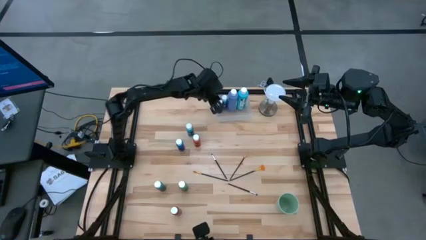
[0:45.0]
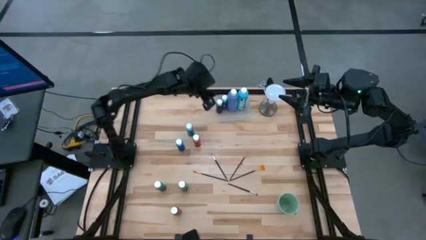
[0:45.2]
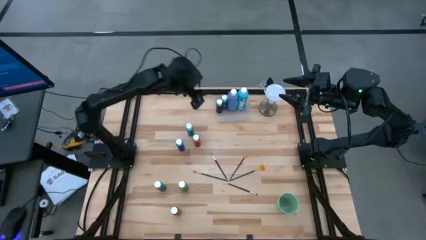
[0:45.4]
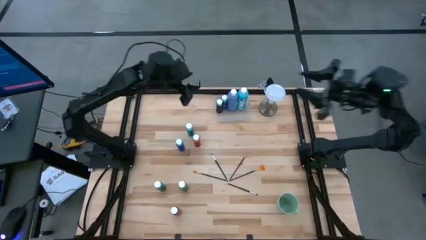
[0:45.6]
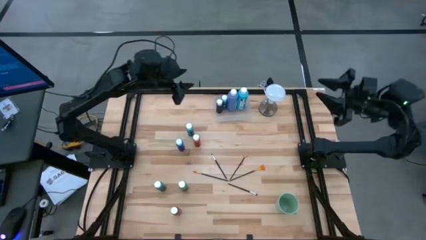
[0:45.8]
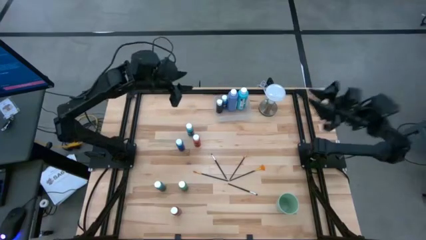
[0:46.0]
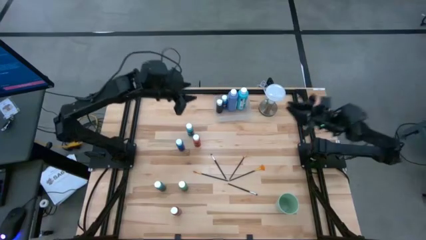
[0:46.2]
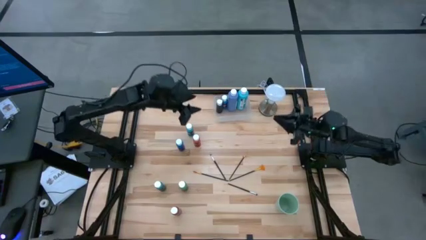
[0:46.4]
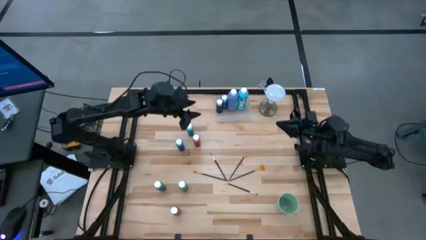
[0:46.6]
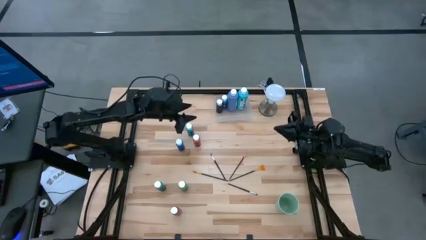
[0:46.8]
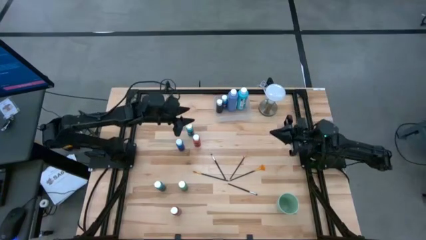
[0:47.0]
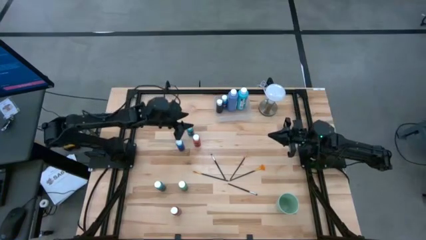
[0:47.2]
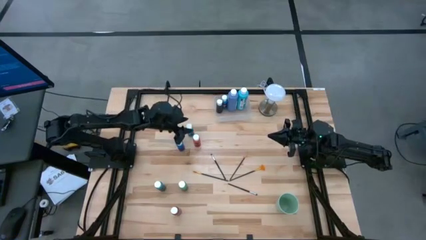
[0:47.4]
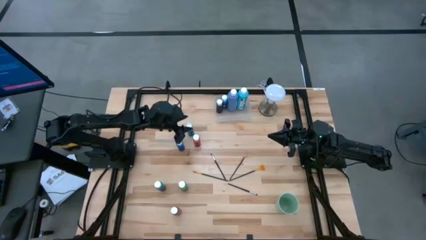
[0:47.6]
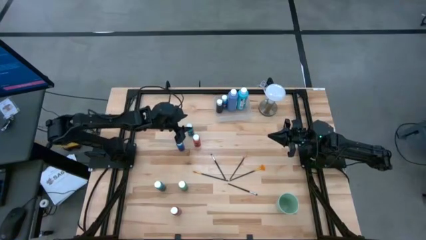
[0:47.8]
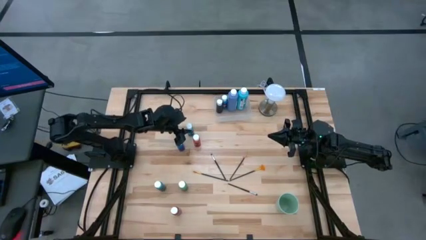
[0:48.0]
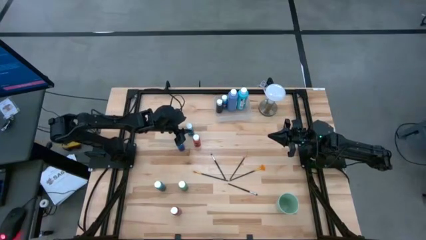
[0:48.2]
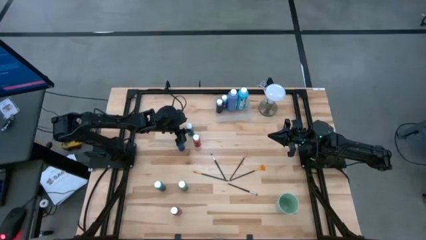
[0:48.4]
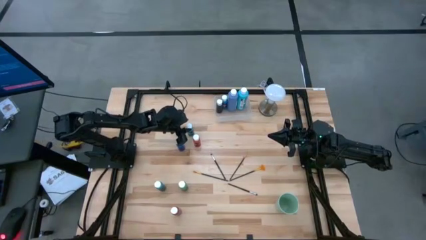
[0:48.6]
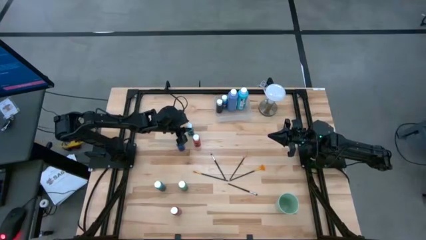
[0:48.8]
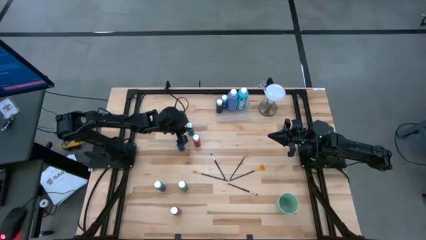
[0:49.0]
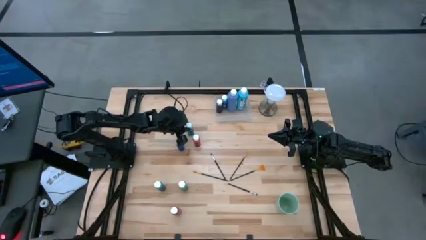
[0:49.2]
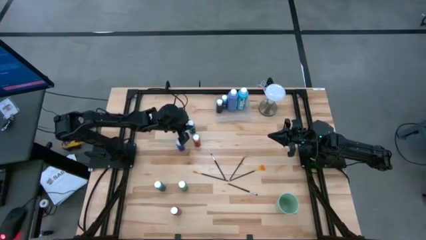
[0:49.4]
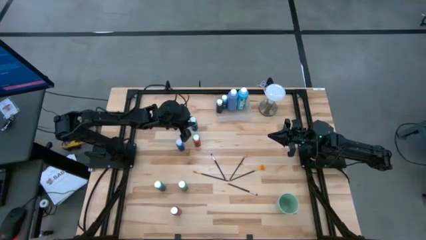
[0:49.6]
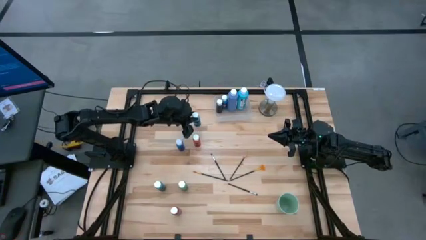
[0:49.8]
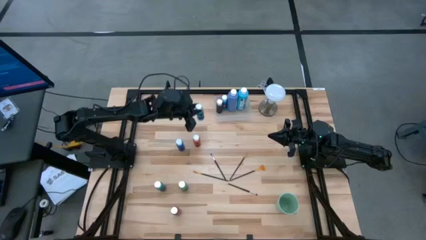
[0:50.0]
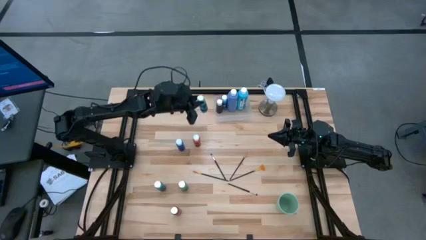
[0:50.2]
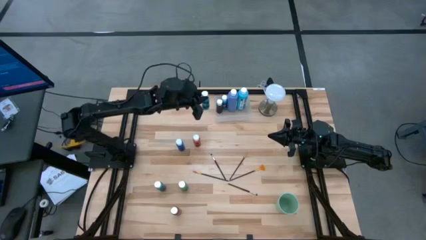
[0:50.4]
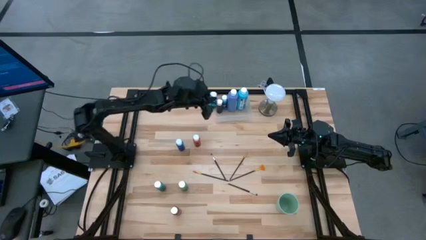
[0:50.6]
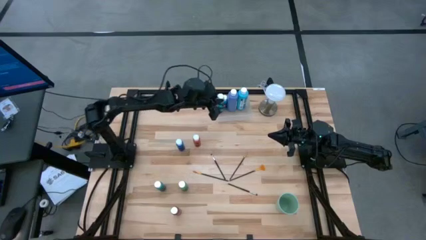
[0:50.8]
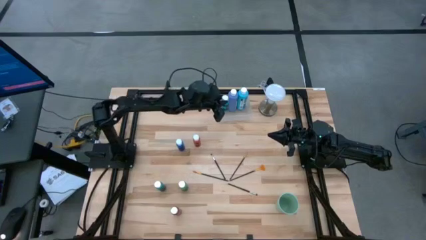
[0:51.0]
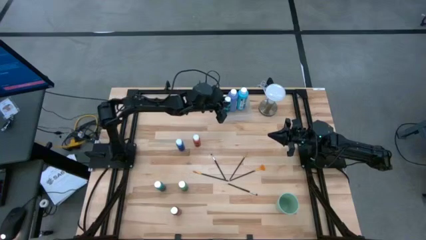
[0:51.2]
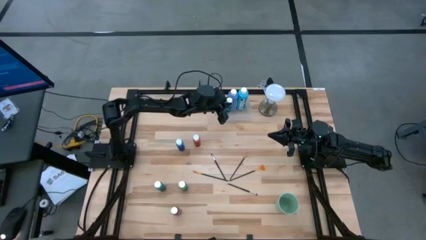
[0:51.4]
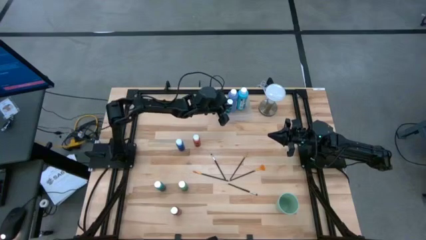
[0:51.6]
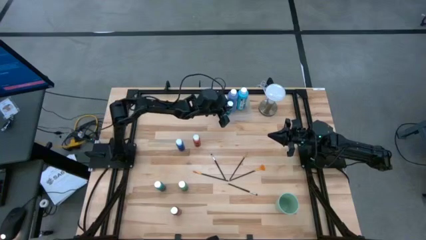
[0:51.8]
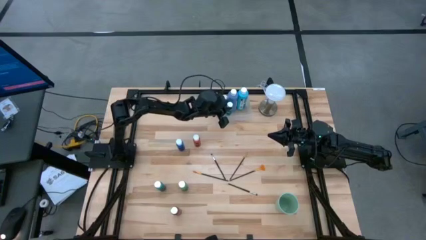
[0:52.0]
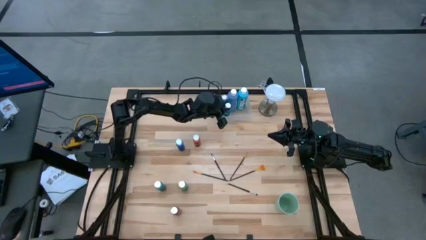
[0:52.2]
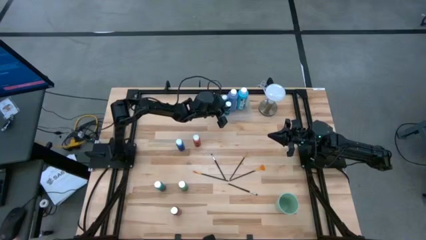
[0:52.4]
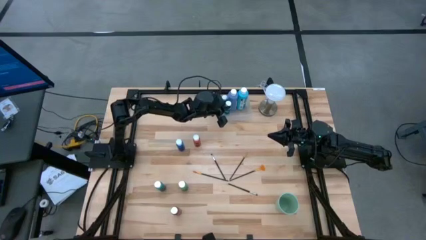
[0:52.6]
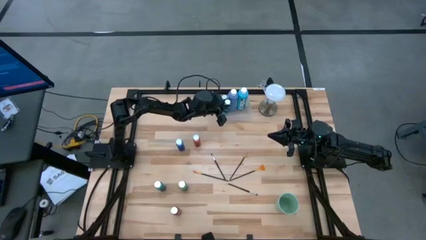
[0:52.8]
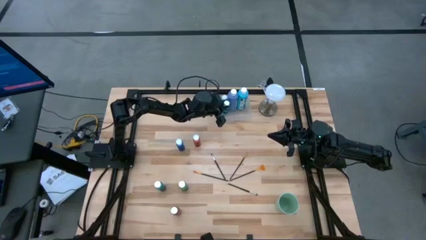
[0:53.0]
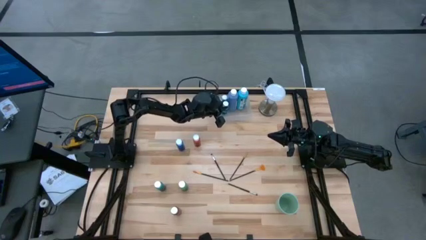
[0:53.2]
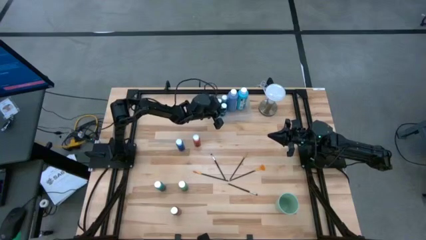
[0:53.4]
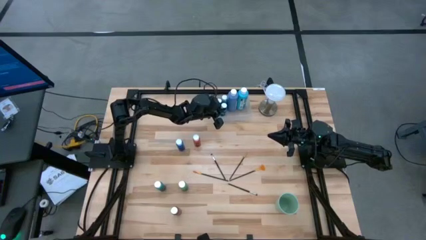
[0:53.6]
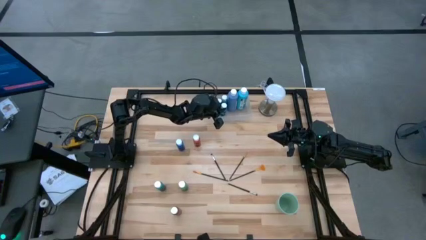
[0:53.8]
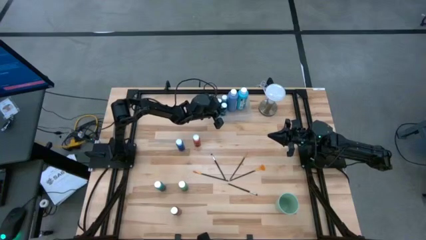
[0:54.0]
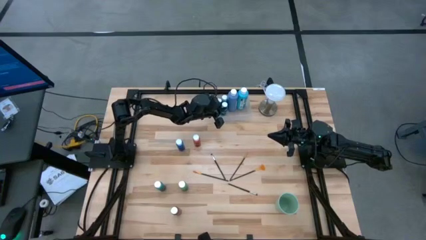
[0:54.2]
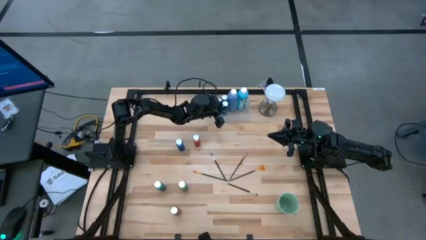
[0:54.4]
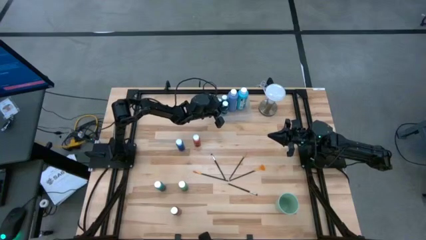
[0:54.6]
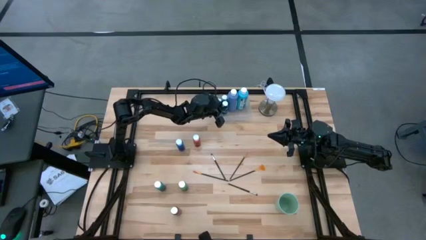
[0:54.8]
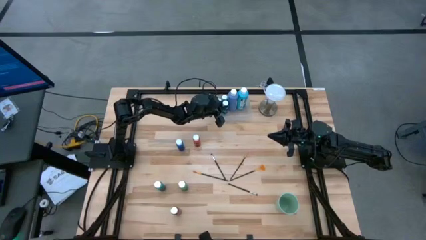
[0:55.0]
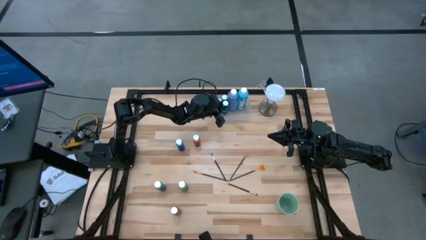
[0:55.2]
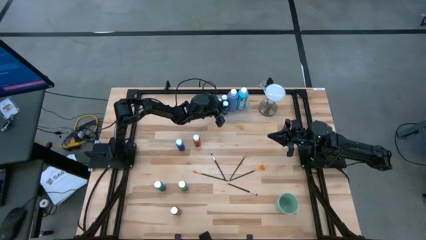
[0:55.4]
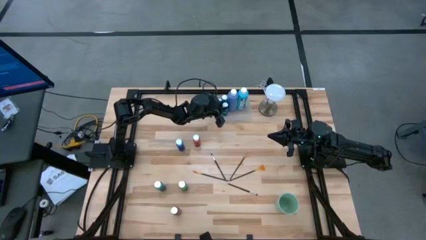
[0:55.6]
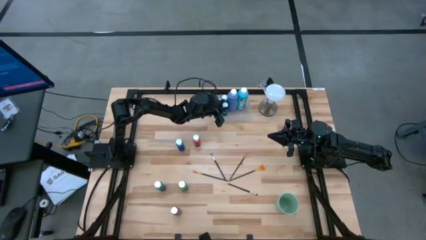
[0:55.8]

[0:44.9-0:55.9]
Task: Pick & Place Paint Supplies
Put the light blue paint bottle into the transparent bin

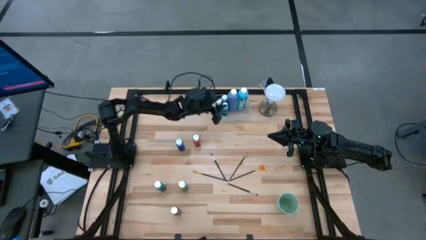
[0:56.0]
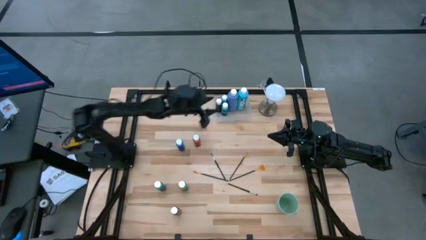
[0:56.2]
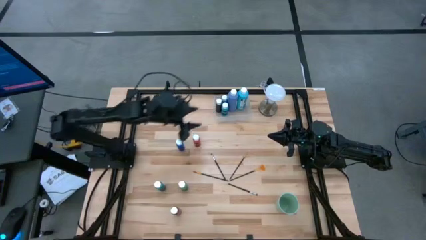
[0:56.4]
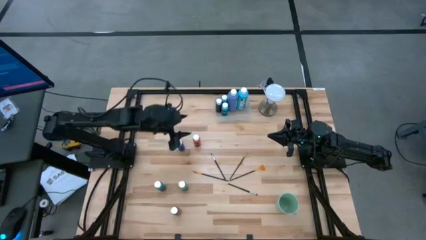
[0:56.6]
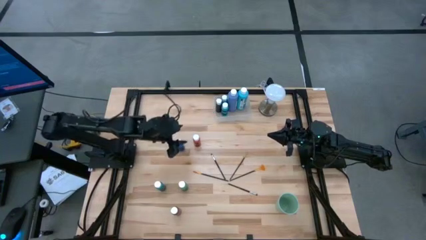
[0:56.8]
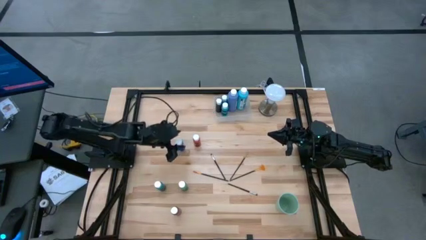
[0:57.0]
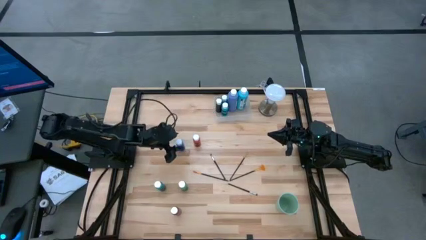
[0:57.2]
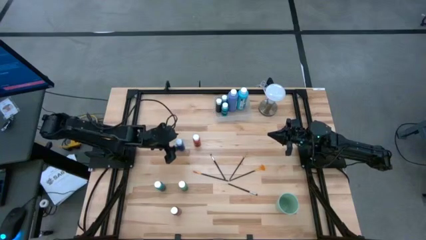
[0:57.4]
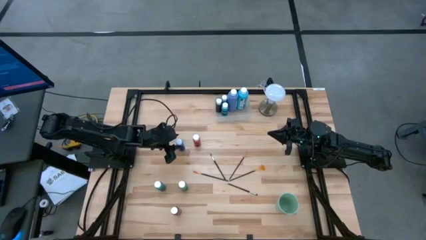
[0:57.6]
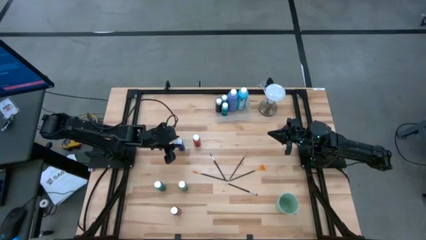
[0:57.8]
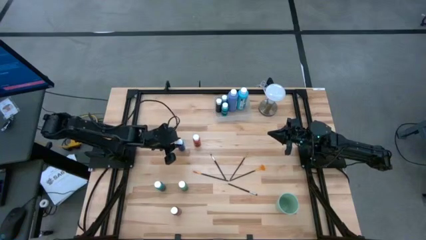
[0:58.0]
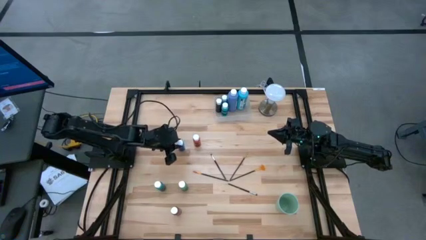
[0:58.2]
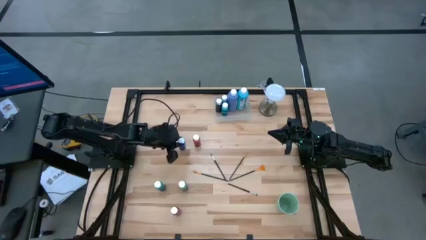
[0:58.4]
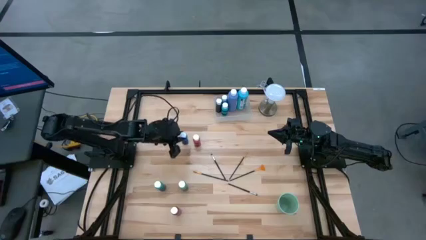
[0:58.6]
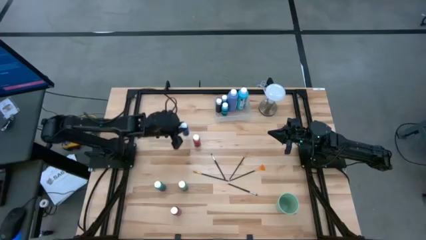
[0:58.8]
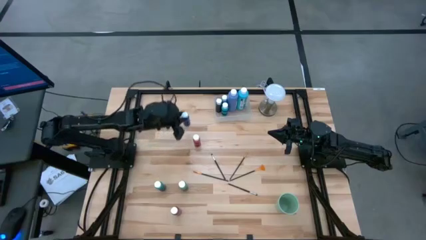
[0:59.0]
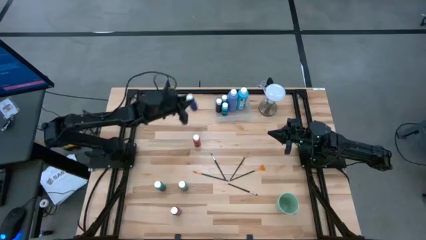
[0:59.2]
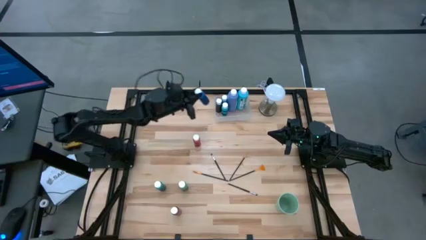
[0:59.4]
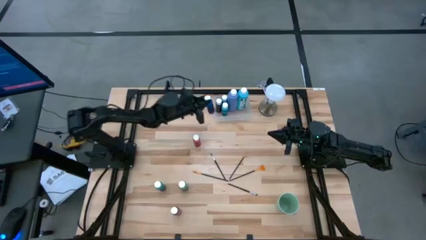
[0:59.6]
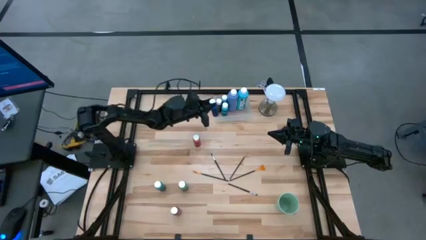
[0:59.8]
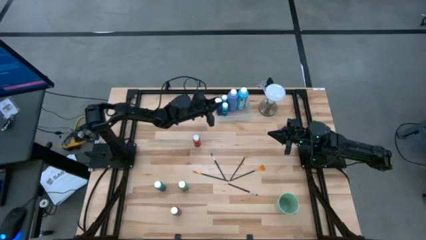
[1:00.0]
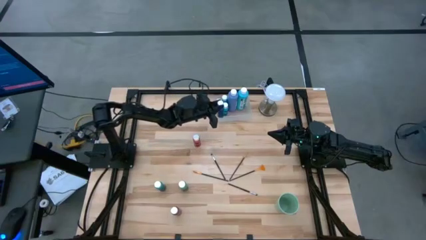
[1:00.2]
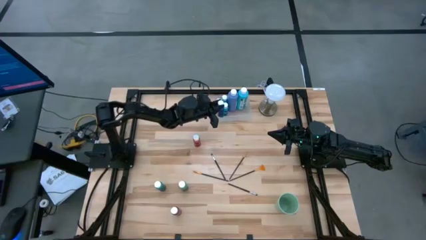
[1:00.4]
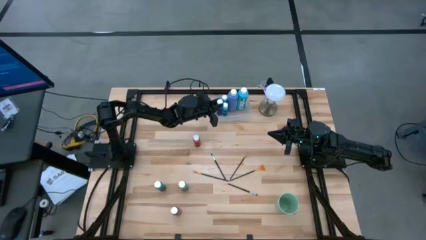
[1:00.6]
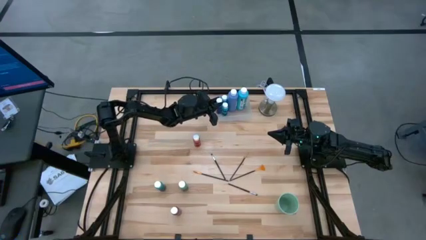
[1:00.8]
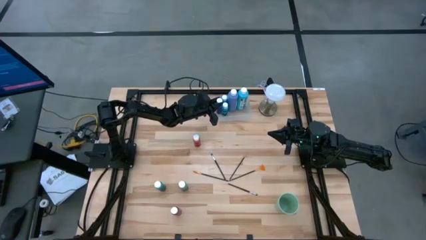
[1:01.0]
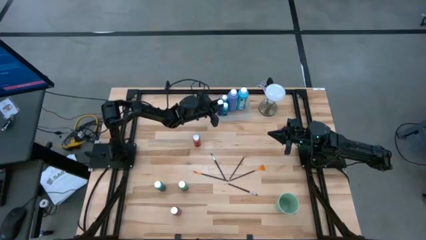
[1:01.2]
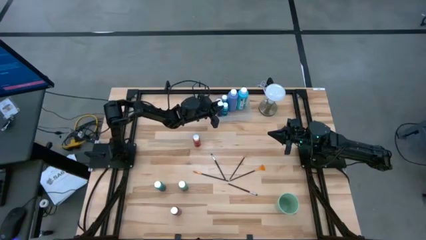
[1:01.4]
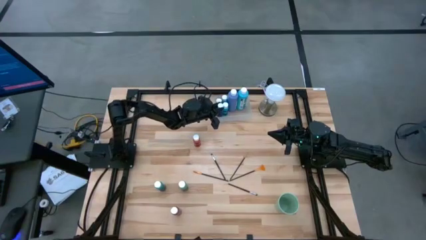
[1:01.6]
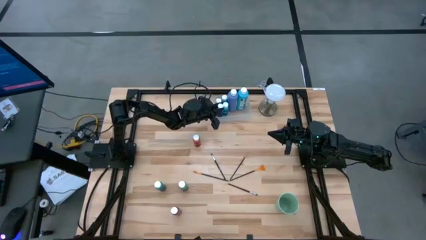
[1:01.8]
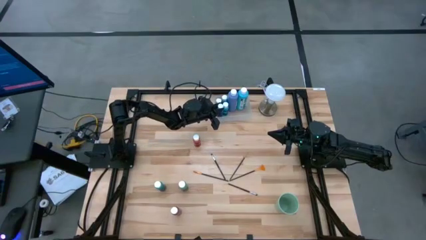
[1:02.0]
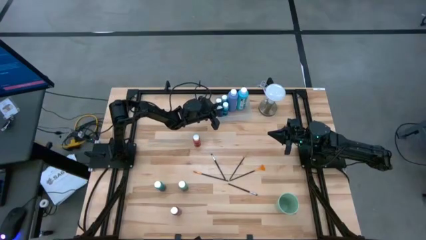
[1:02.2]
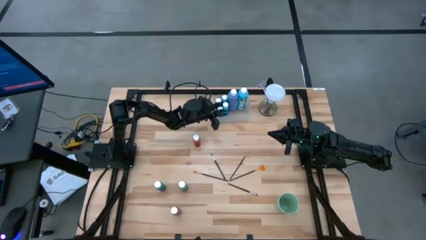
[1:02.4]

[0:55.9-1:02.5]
Put the blue paint bottle into the transparent bin
